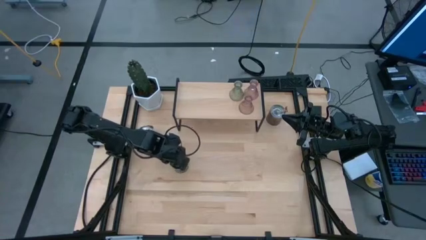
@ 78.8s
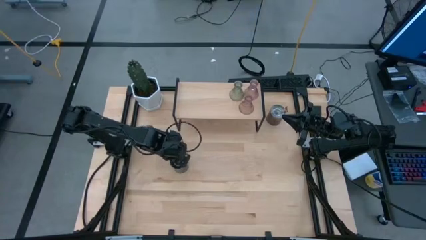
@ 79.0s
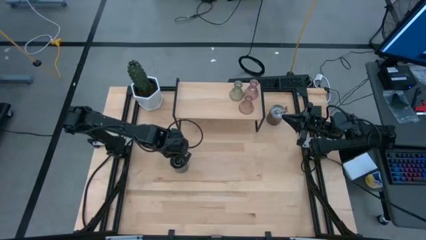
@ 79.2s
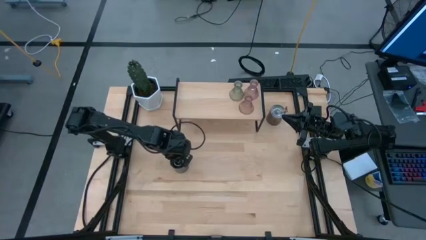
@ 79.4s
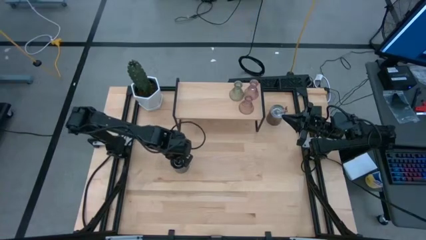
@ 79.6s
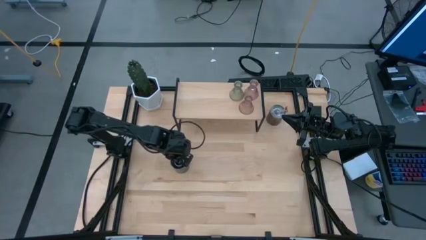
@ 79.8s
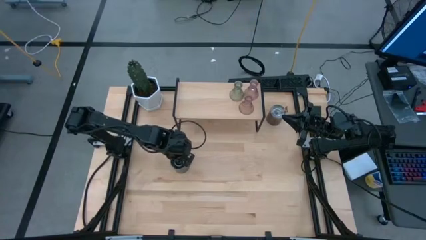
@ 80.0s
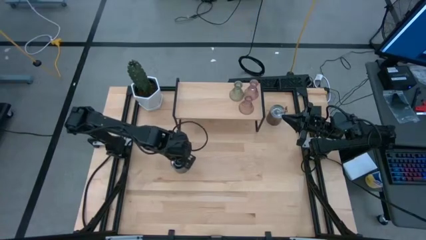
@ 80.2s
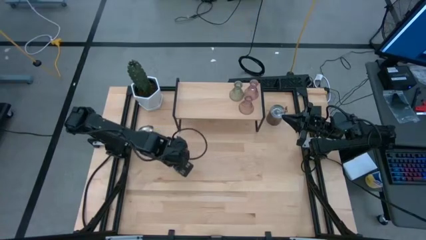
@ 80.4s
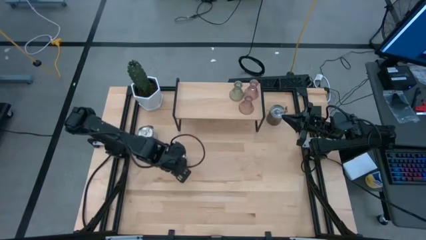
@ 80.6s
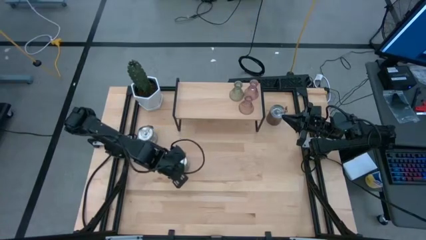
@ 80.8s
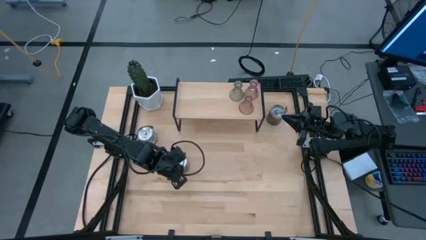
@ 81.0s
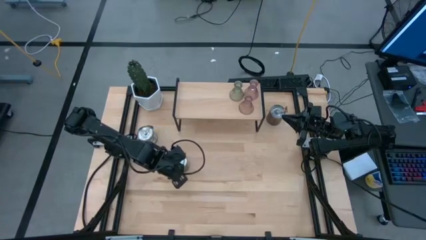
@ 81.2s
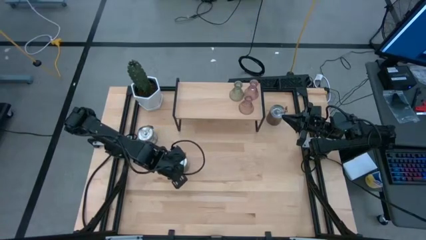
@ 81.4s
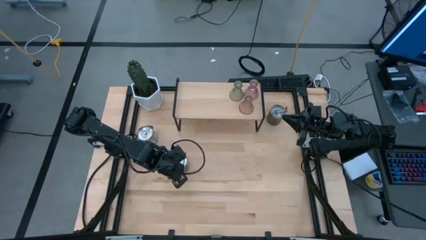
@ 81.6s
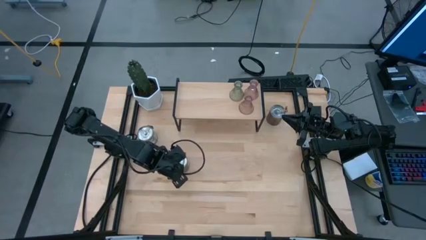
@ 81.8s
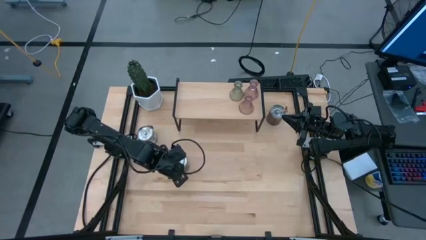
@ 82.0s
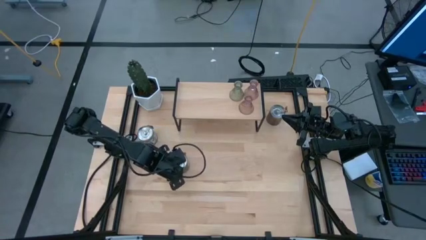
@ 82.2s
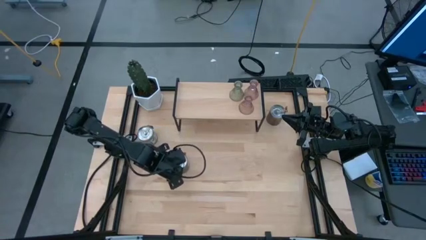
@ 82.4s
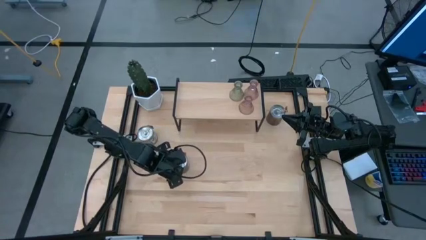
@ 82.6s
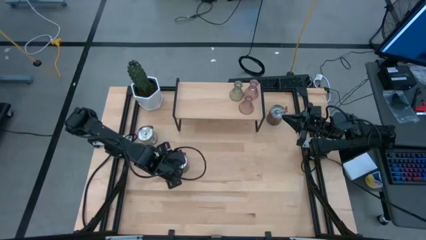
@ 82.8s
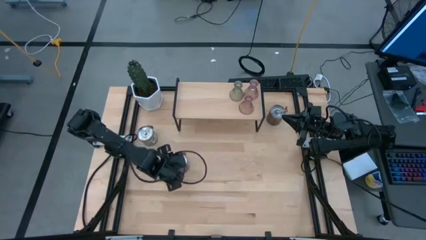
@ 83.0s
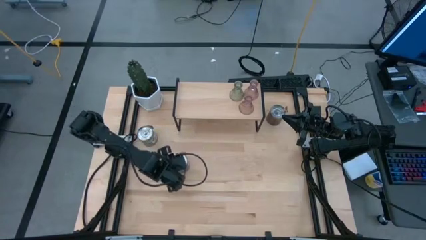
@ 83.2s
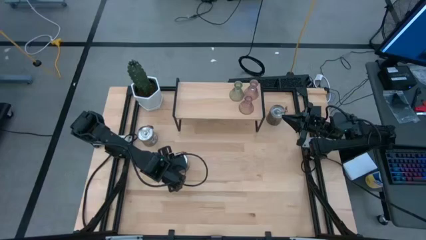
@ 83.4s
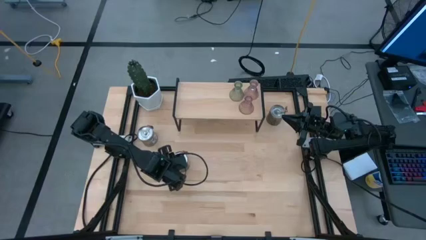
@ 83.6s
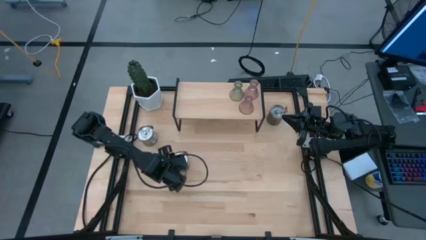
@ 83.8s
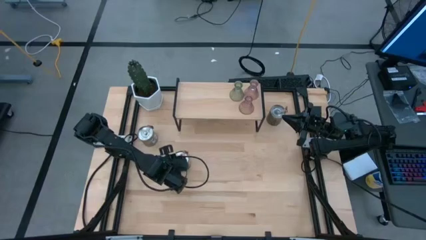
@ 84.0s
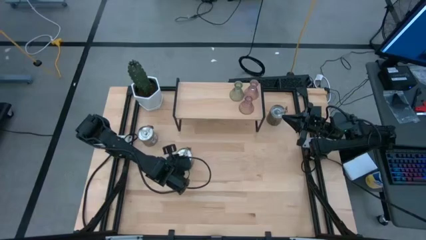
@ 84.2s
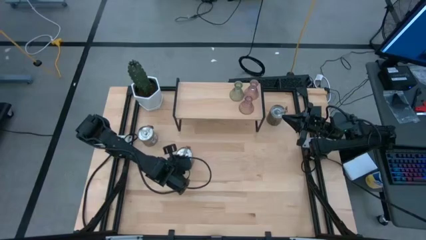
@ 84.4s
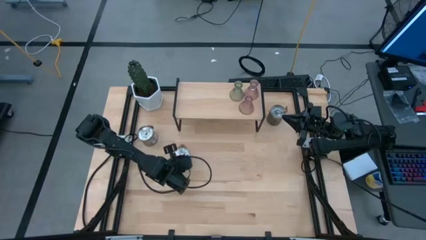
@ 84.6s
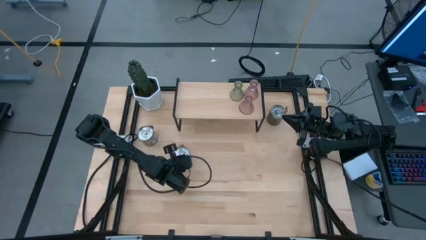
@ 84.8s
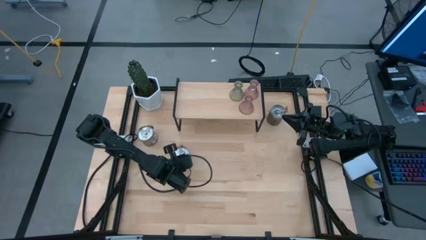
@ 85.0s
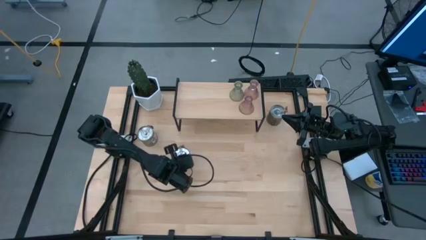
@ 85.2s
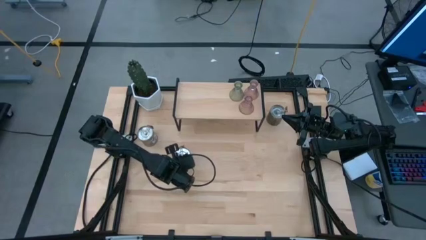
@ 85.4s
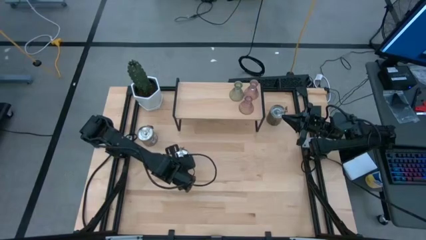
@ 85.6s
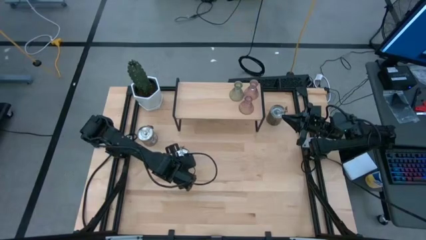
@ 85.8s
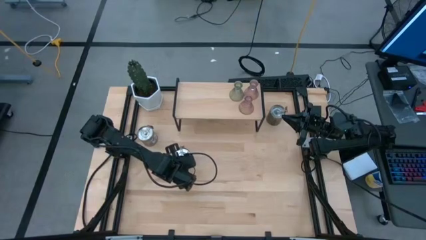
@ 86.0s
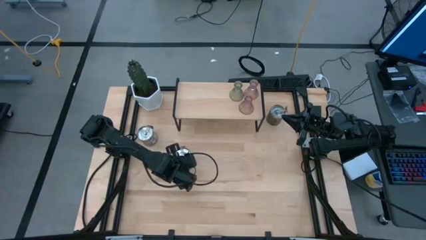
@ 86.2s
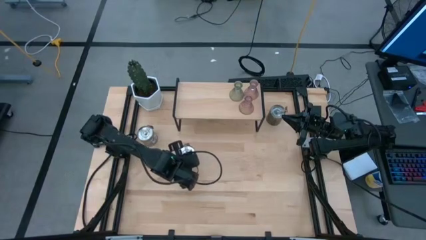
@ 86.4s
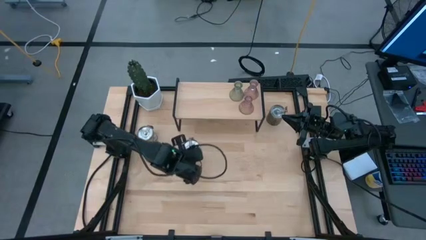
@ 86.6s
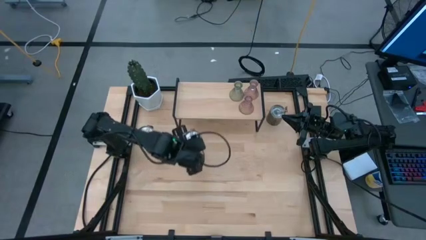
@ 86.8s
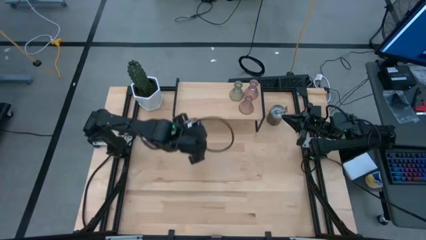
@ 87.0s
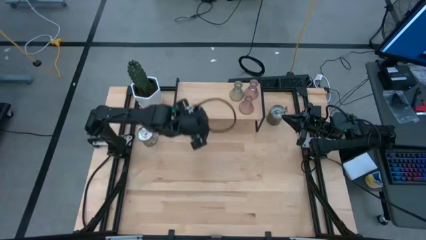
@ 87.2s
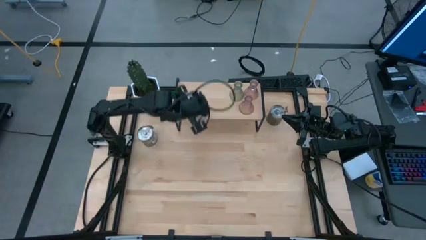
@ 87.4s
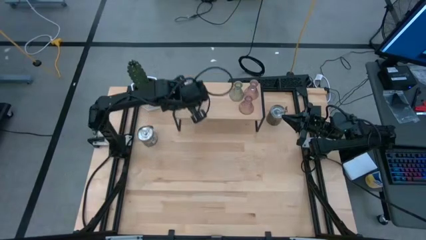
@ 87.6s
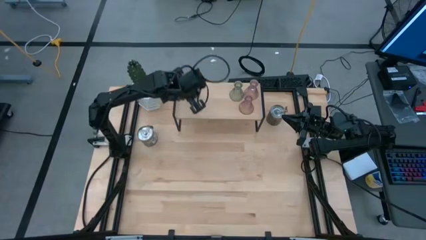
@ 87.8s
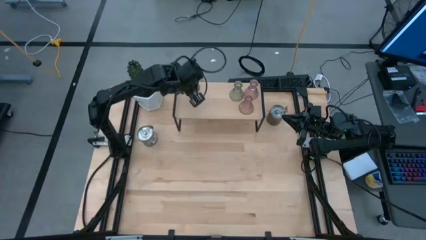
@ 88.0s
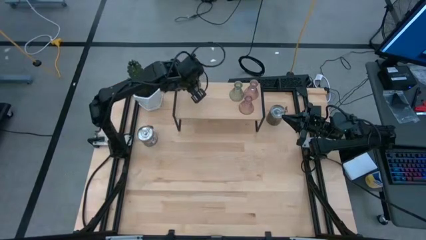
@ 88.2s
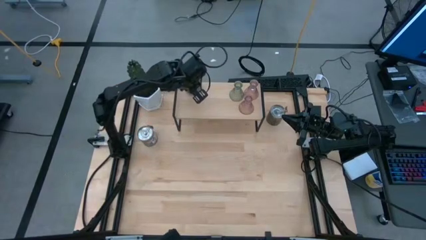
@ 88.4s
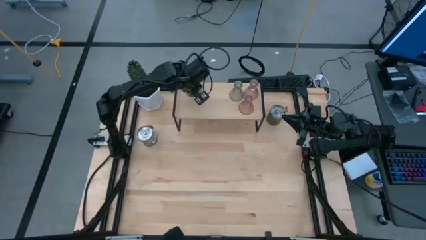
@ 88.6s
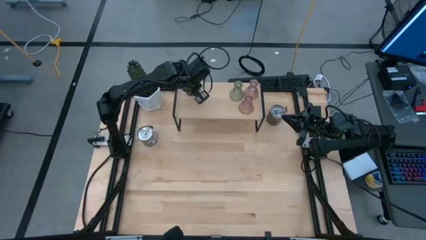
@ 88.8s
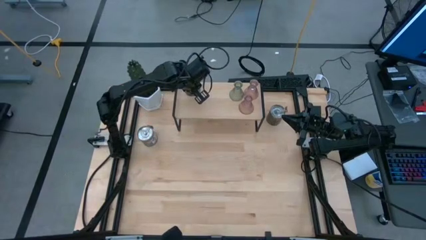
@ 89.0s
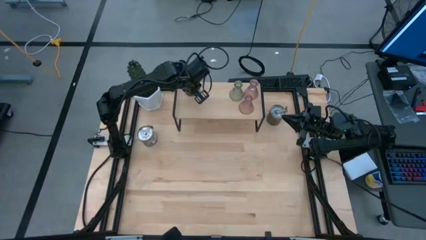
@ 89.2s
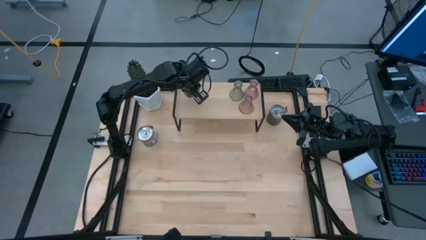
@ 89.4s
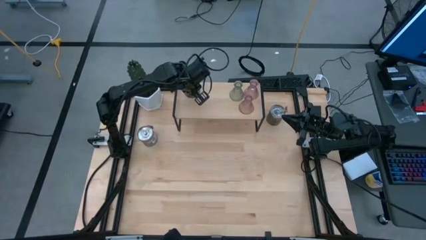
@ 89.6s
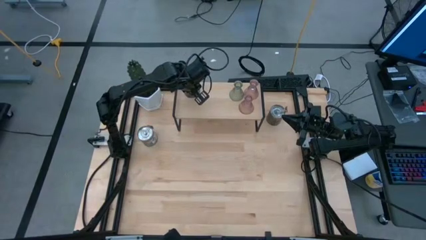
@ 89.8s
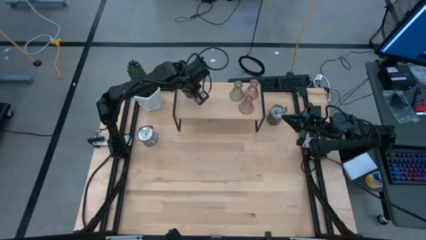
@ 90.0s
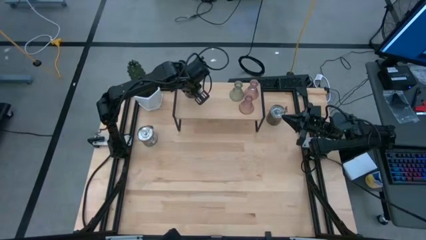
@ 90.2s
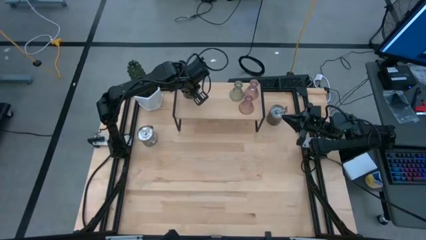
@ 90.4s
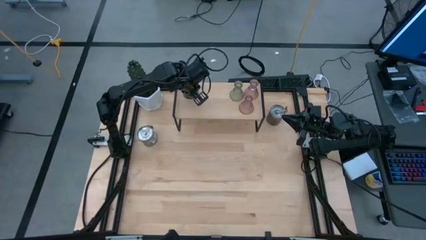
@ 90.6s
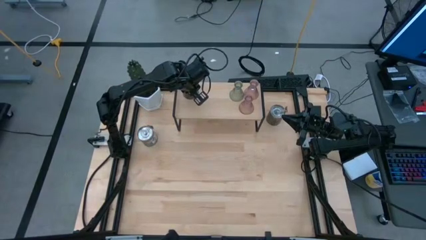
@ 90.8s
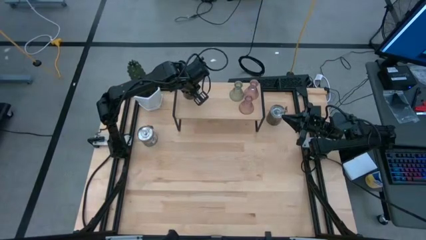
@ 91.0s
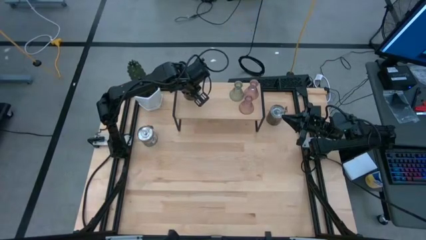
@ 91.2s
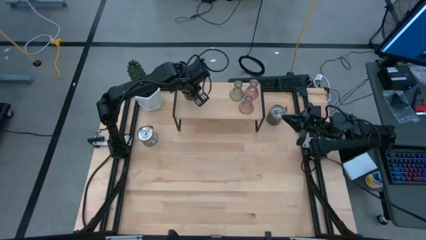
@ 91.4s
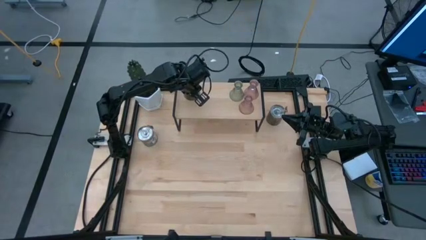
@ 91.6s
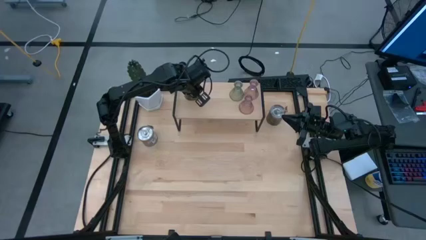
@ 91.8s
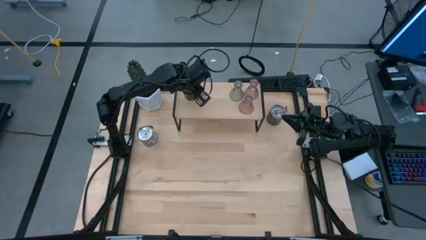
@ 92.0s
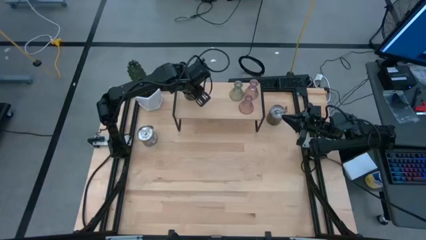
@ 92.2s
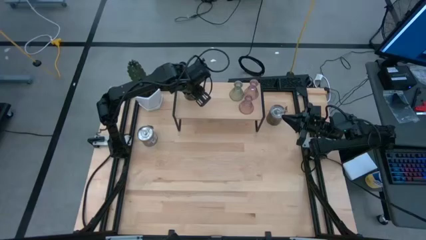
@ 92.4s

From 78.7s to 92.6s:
Task: Pick & Place candle stick holders
Put the orange scented candle on the shelf
